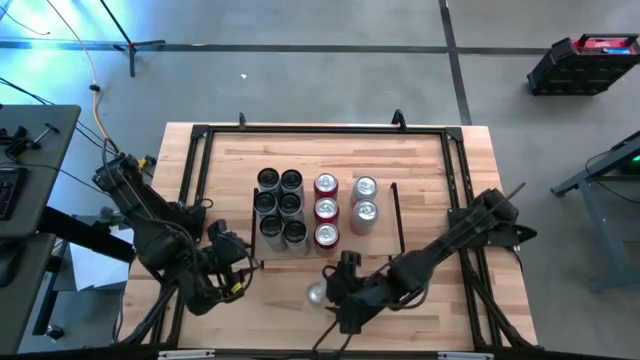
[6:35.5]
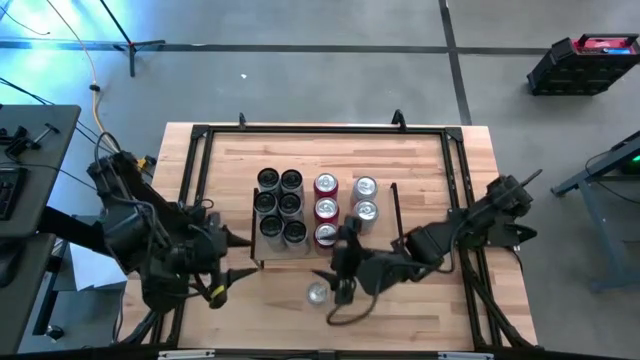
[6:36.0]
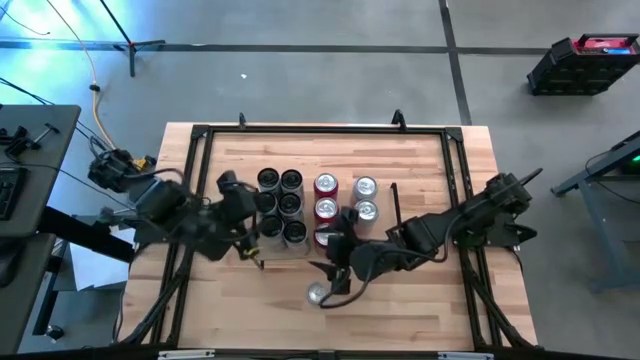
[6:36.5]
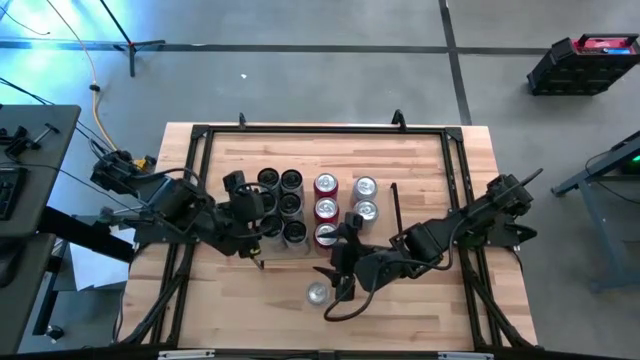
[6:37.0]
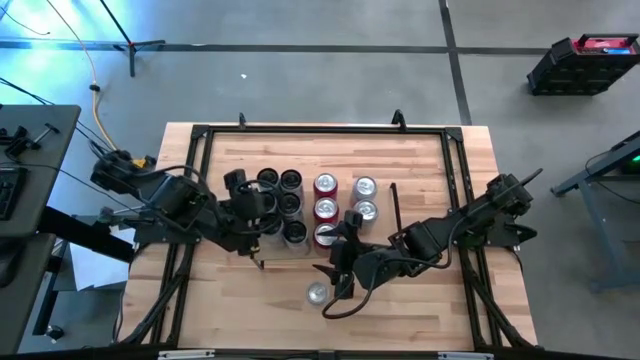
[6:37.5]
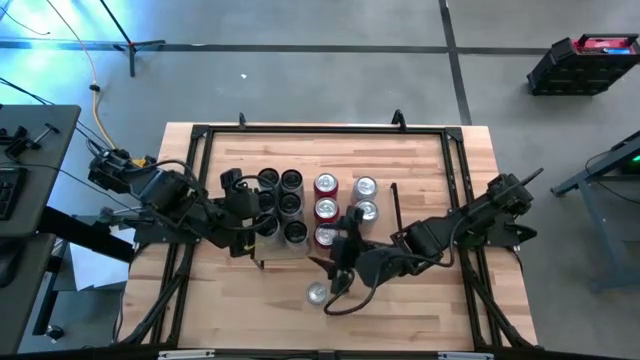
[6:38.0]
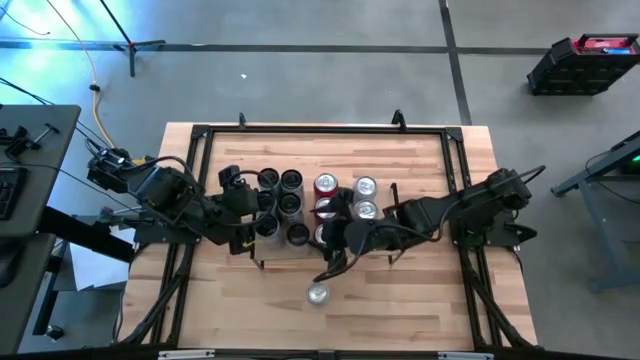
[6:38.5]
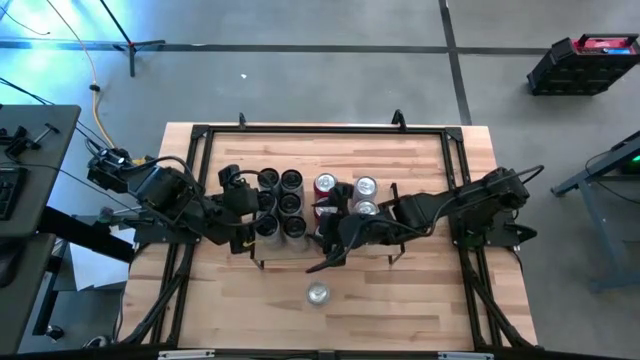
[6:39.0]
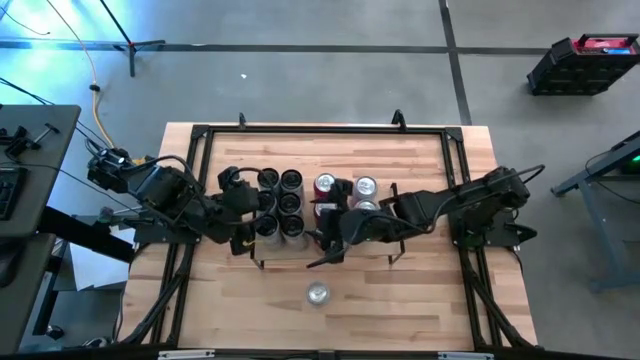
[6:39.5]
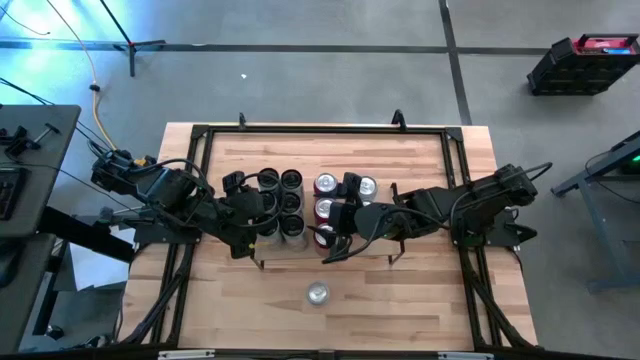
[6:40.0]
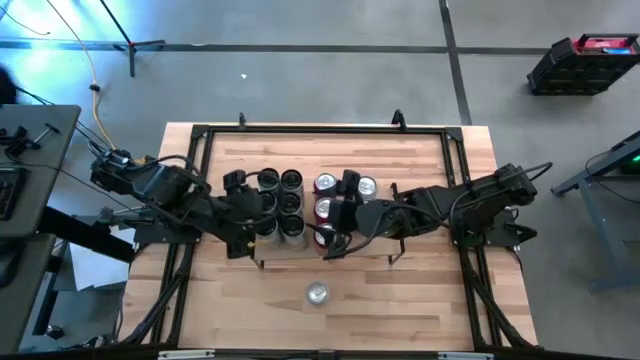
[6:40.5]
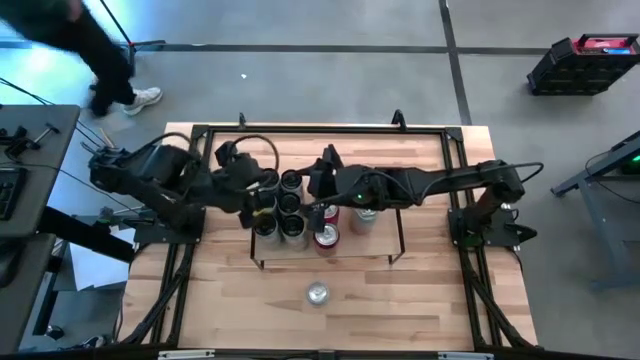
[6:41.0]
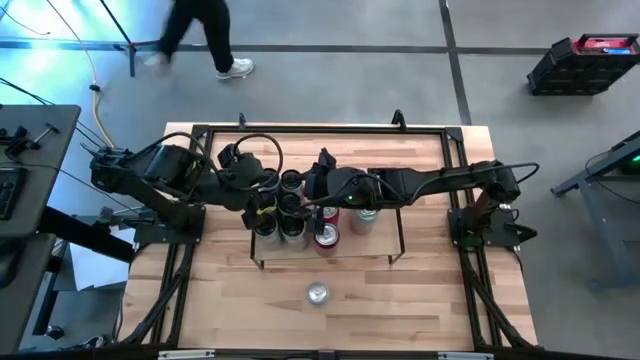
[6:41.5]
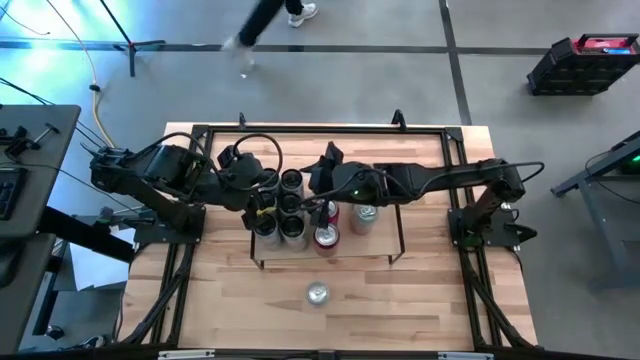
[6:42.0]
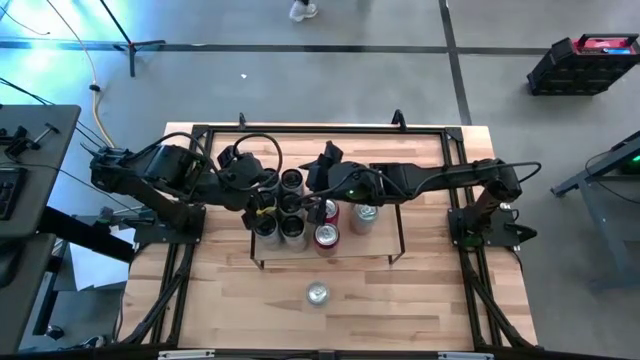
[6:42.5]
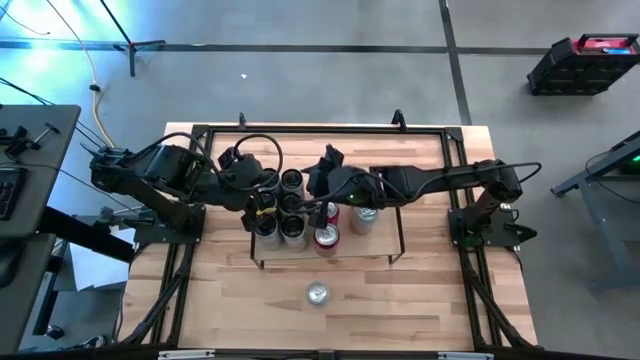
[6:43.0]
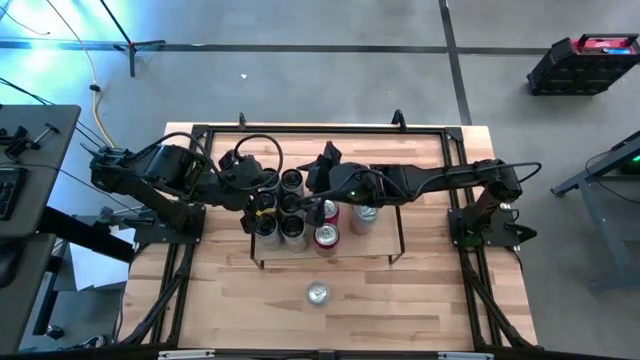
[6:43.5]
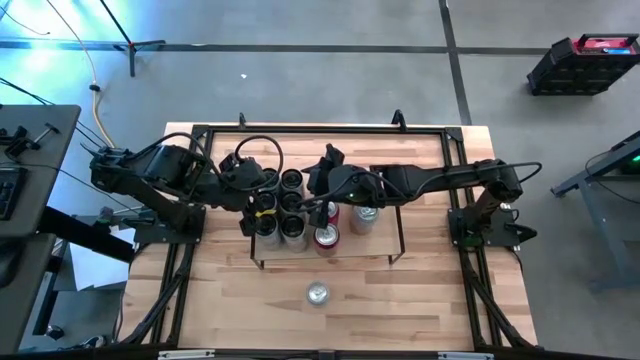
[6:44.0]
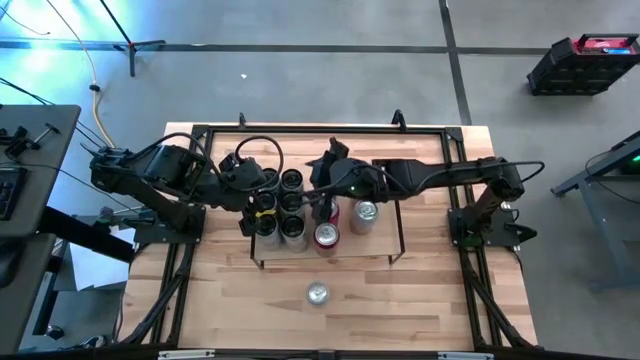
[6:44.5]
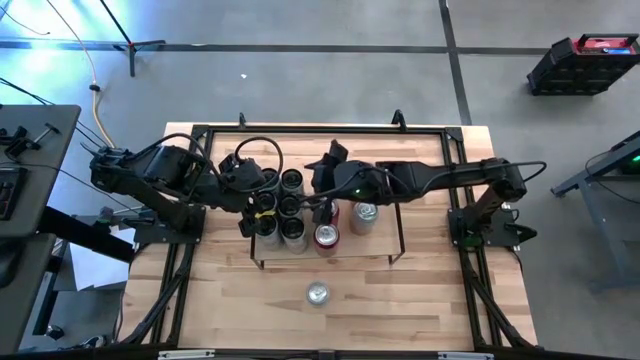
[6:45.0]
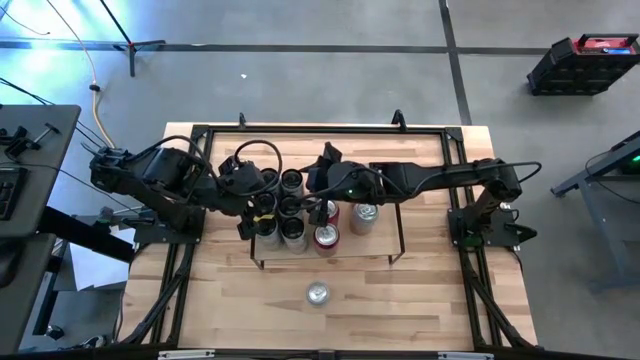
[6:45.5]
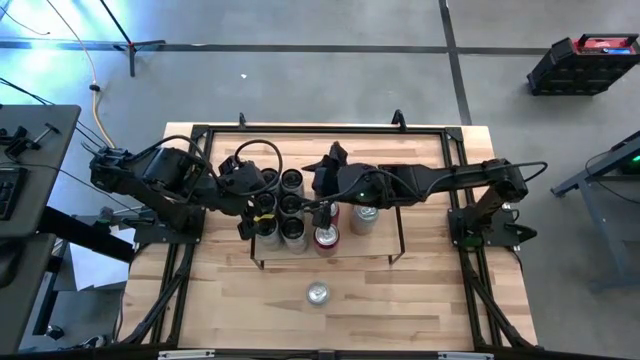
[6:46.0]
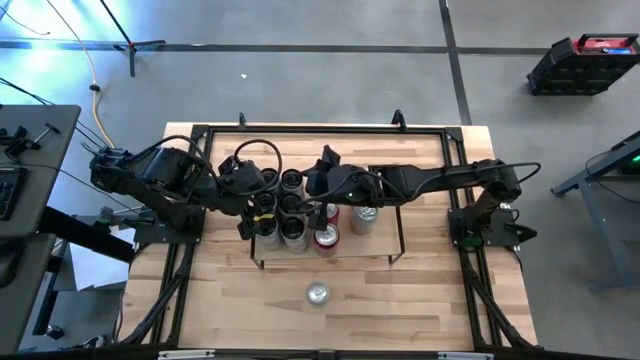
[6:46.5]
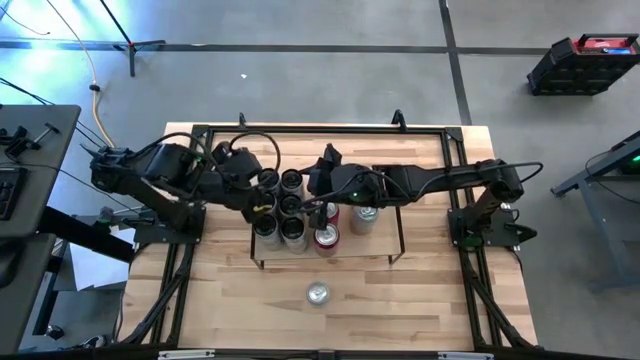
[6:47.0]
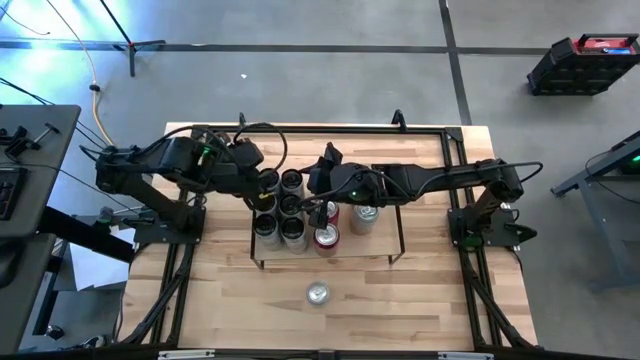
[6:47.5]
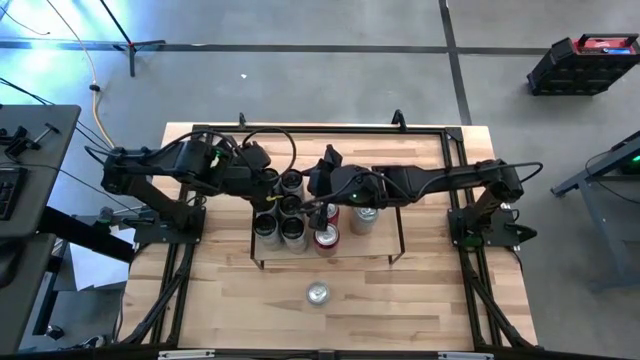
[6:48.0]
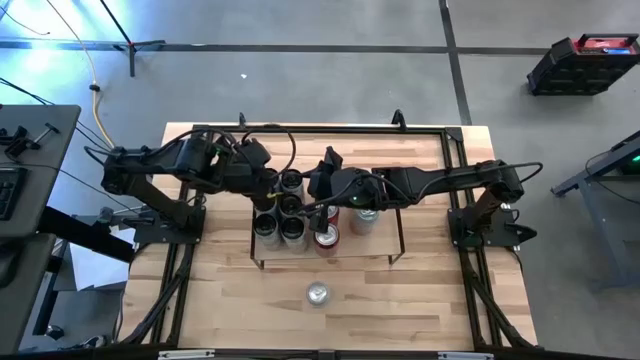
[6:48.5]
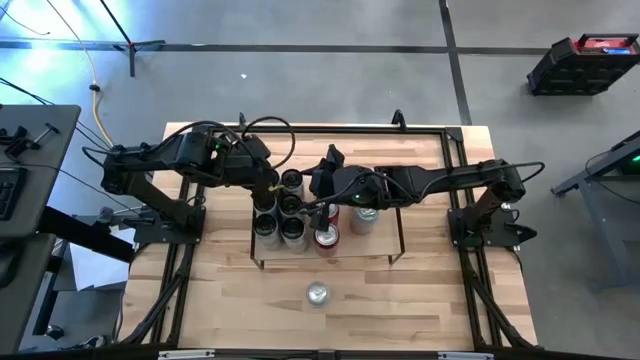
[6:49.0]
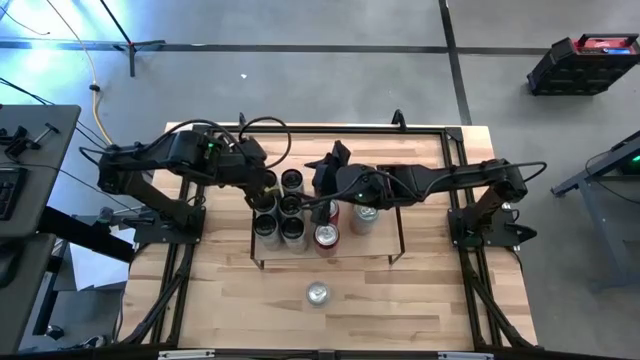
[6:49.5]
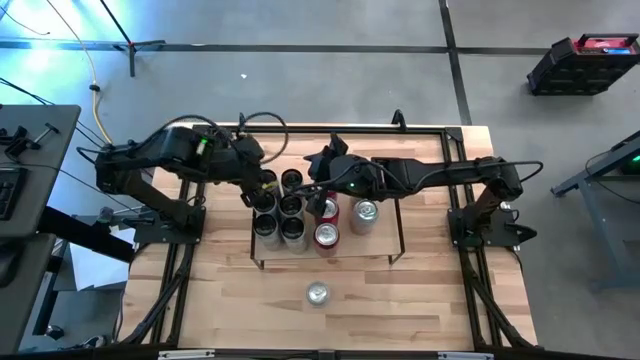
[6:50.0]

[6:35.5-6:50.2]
Task: Place canned beverage on shelf
Adjust the soda cans on the shelf

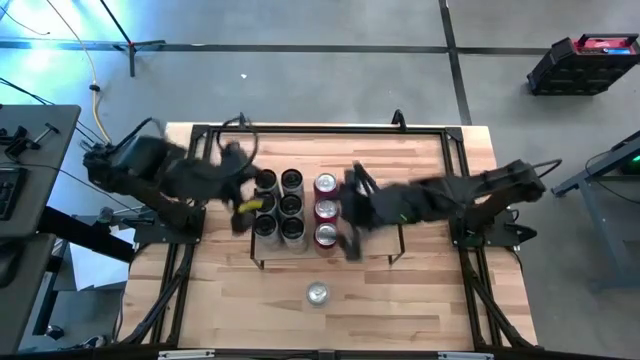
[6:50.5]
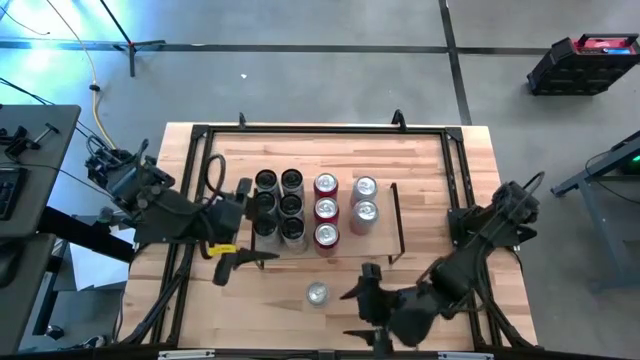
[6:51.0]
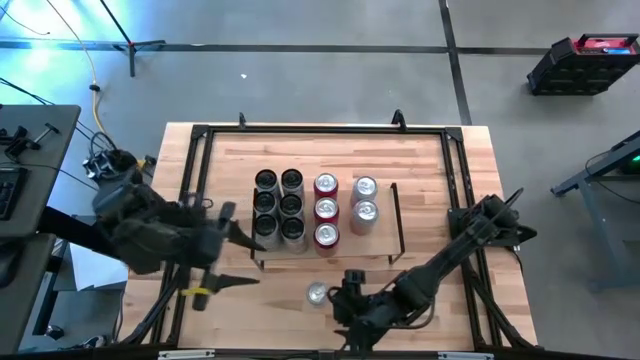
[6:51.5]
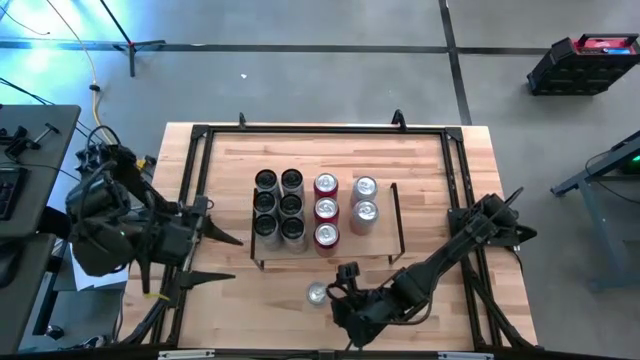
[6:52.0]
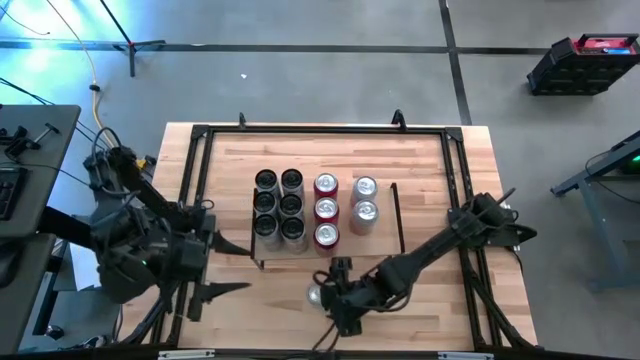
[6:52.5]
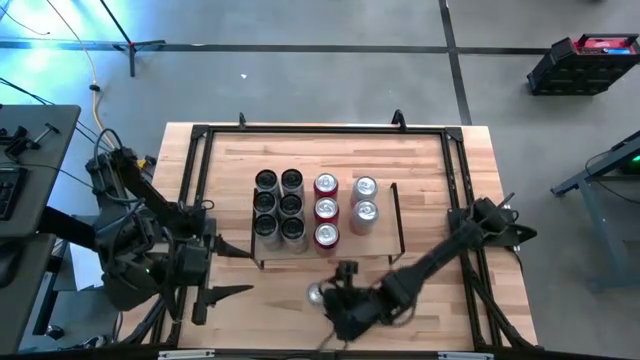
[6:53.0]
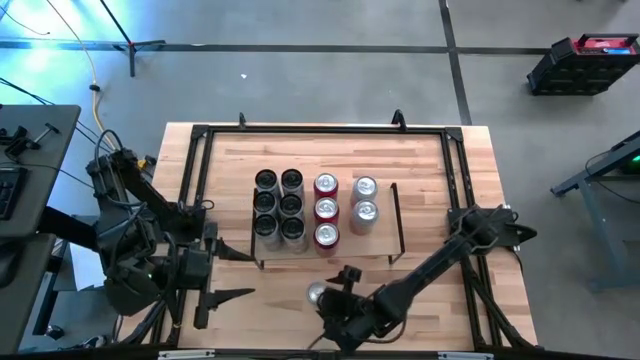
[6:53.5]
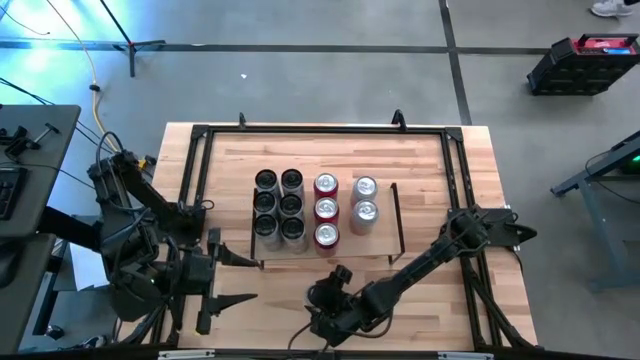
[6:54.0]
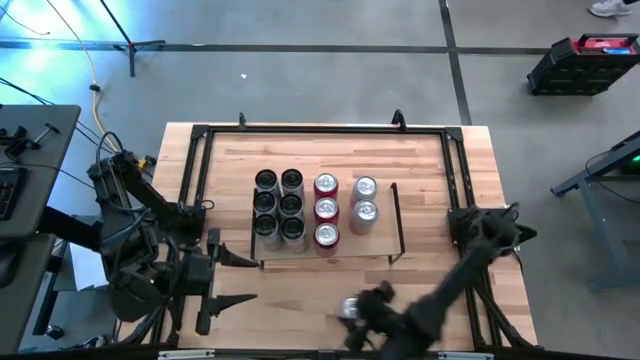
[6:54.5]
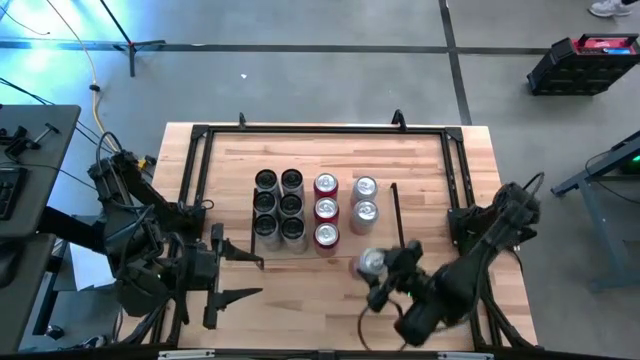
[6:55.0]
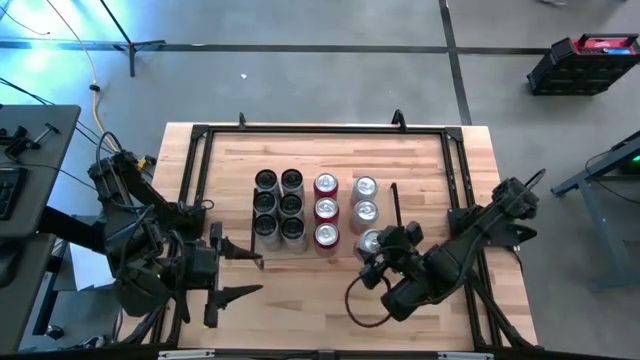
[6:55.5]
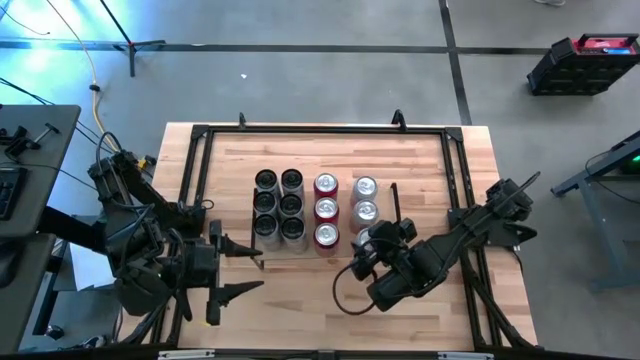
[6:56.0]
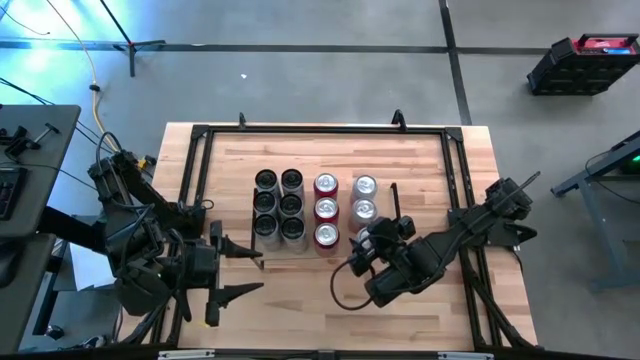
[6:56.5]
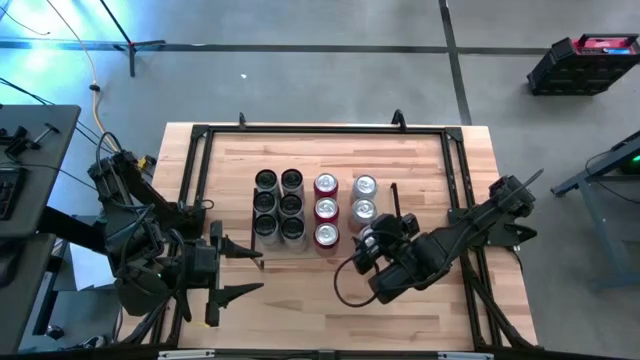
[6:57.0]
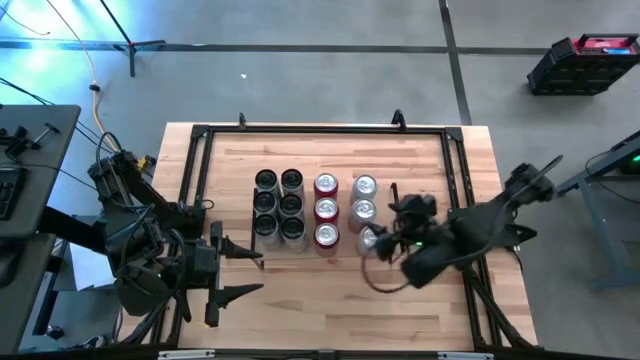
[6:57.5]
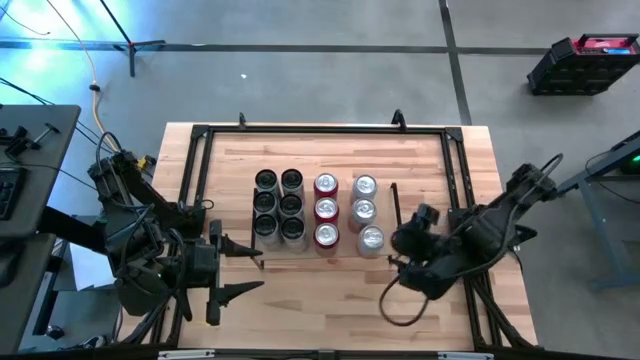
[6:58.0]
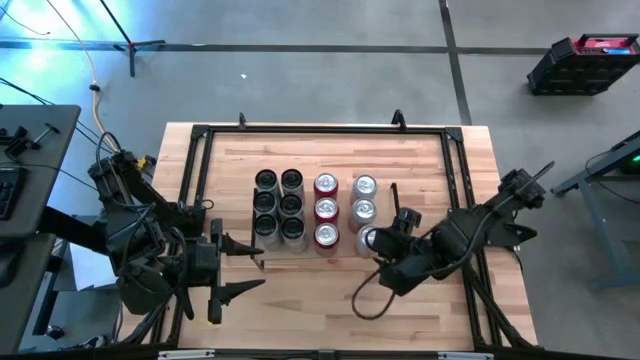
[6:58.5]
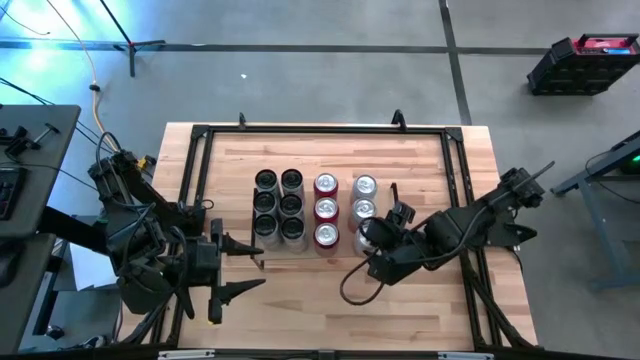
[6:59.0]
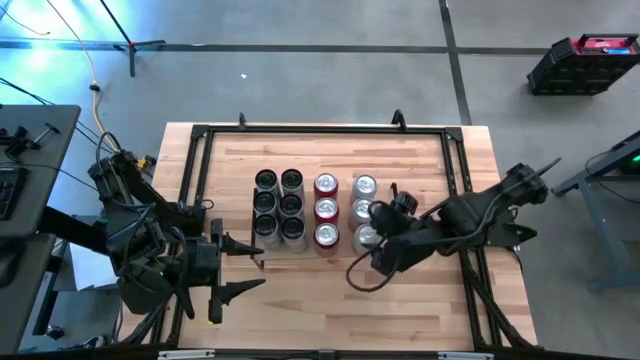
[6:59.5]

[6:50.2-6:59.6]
Put the pink white soda can on the shelf aligned with the orange white soda cans
